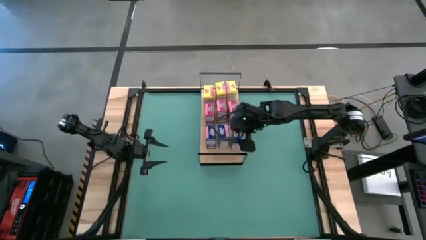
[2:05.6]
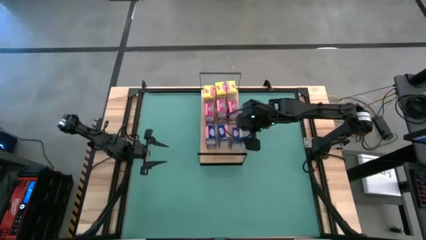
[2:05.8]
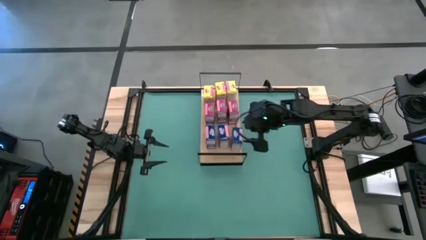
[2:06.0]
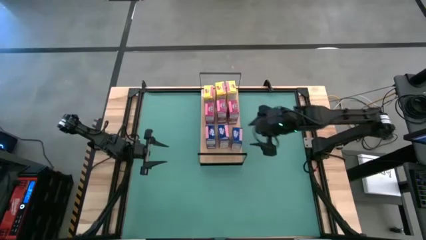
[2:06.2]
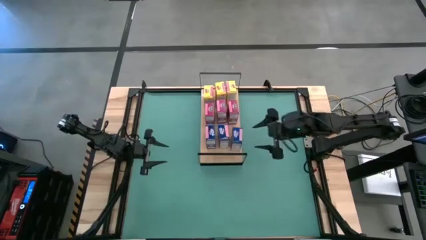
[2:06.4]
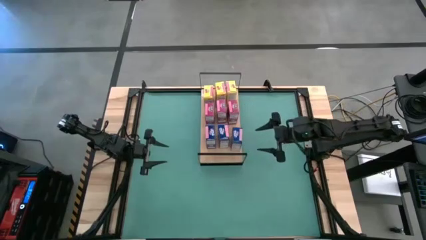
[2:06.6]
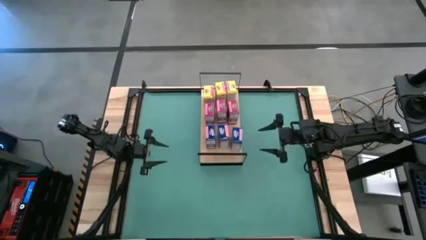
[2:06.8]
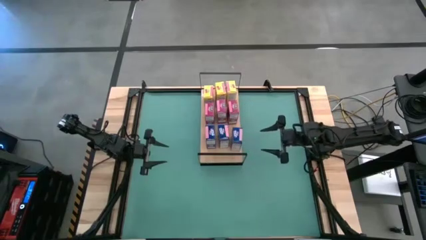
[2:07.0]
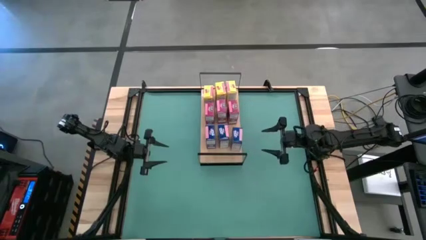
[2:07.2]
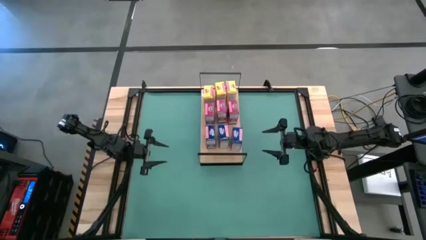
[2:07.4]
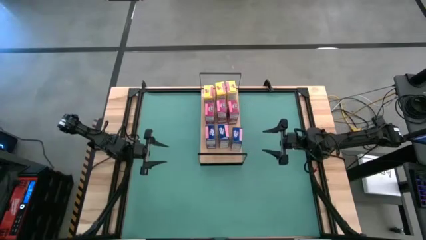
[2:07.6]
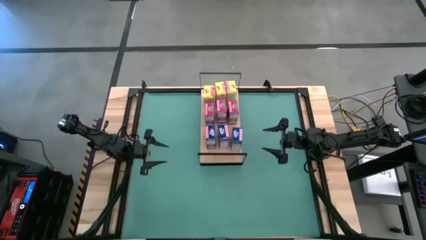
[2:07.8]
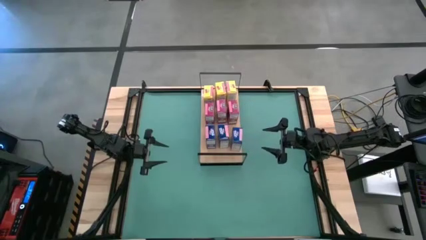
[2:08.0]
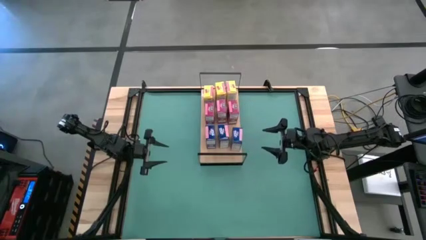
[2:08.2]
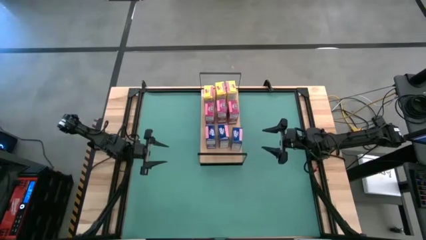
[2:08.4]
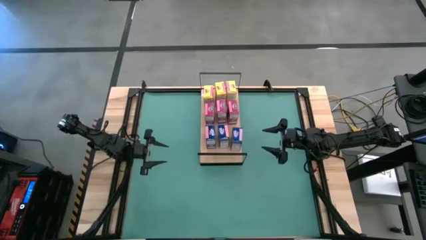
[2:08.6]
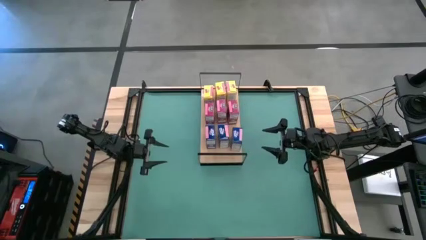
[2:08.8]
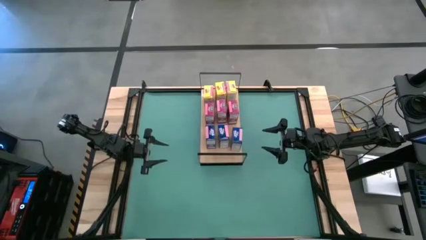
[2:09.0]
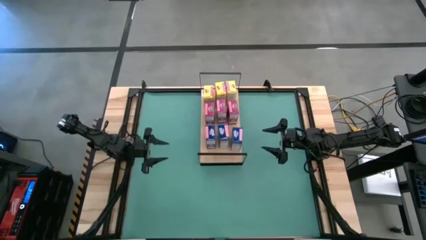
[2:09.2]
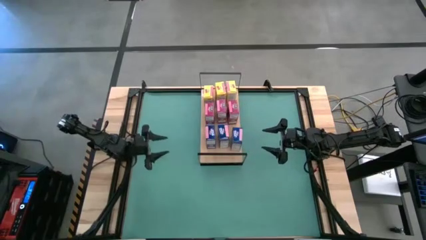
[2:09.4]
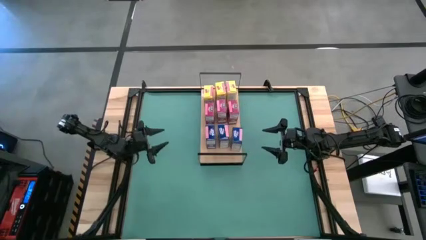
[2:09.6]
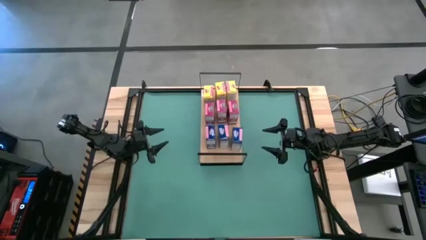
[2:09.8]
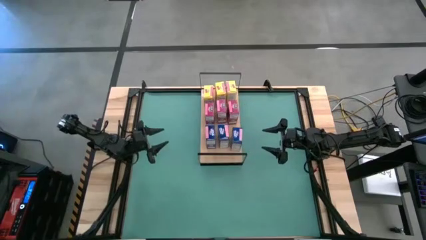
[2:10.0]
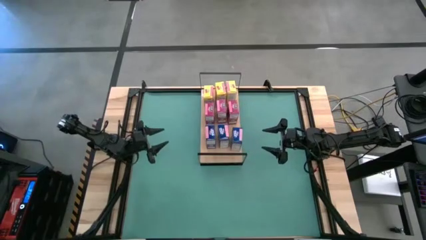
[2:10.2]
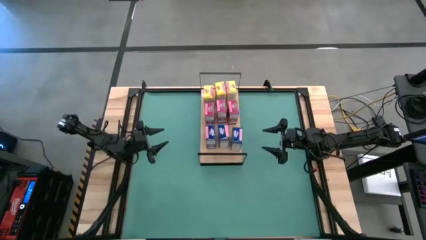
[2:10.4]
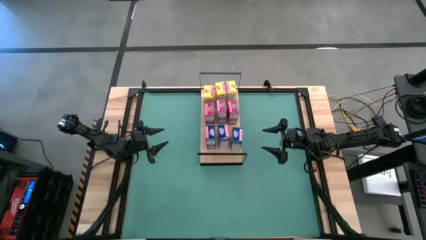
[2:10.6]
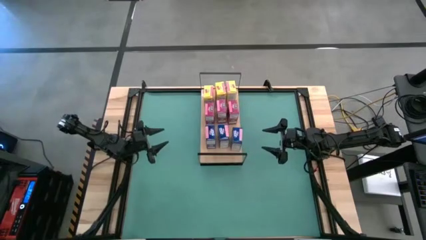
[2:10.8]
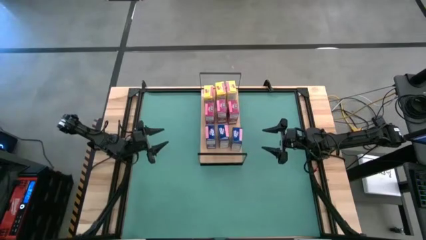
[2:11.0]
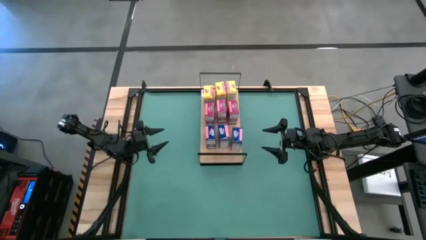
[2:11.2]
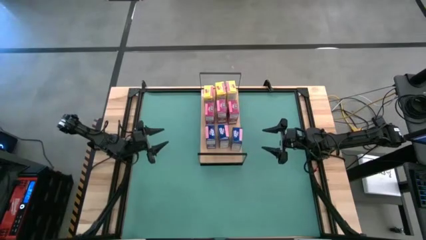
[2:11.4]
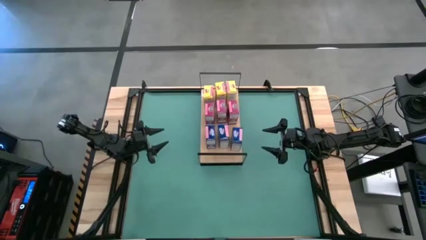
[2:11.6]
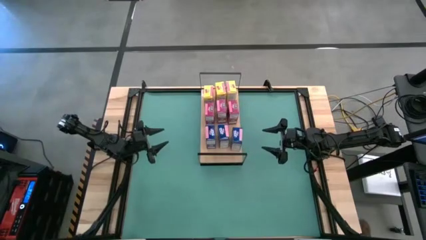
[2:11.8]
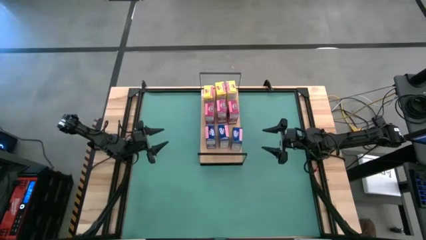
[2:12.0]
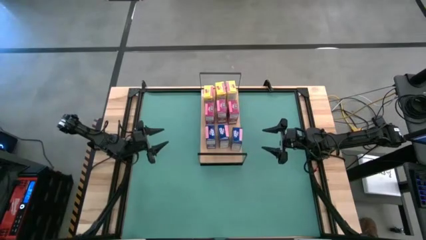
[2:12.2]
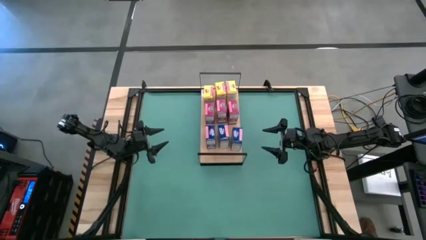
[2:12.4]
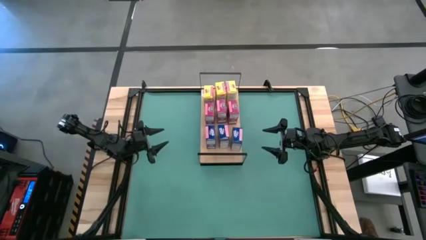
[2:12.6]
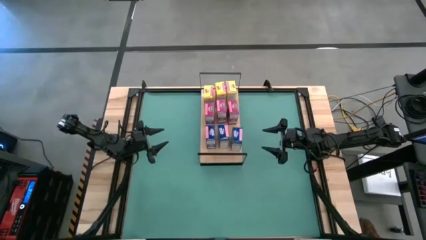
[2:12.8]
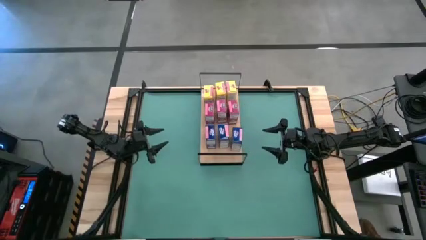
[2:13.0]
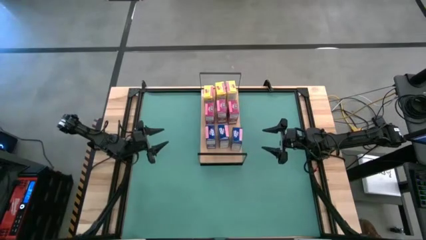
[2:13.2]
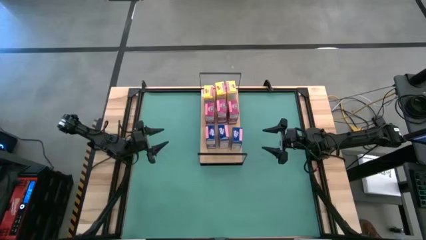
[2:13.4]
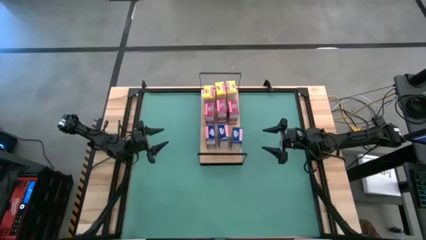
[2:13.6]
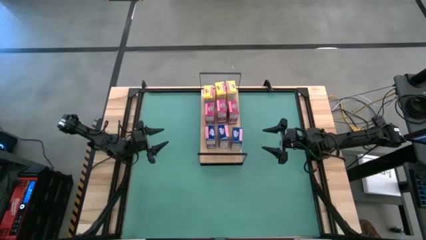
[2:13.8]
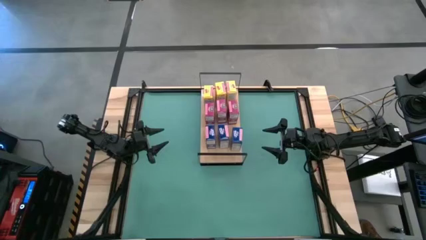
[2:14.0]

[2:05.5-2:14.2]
Task: Stack cereal on shelf
Return to Home Position

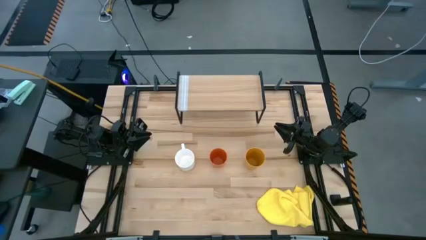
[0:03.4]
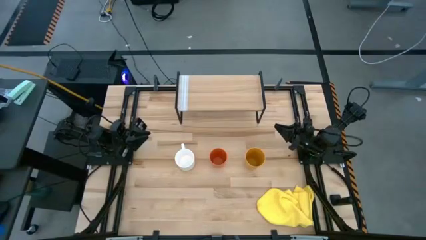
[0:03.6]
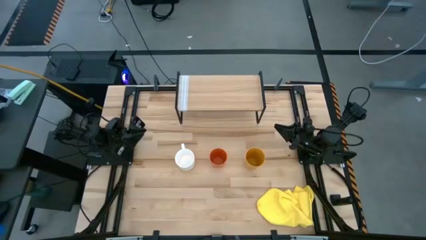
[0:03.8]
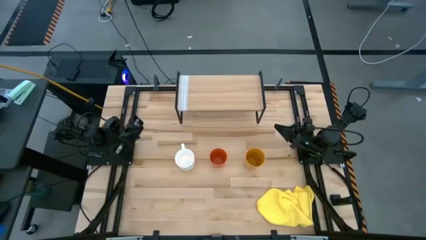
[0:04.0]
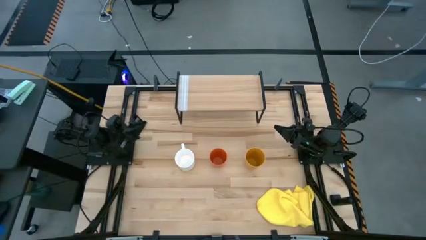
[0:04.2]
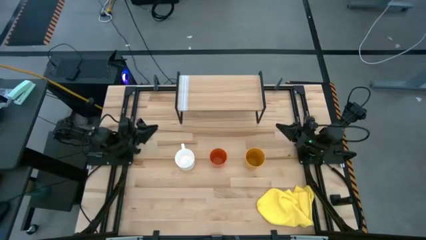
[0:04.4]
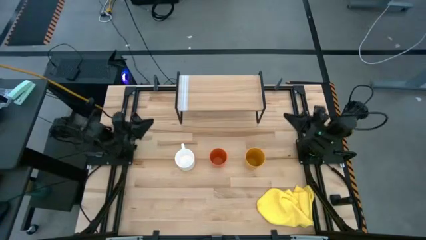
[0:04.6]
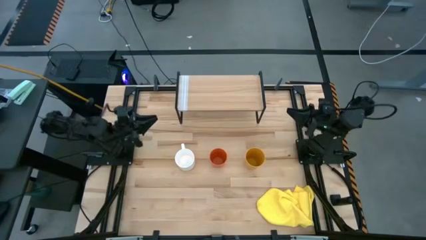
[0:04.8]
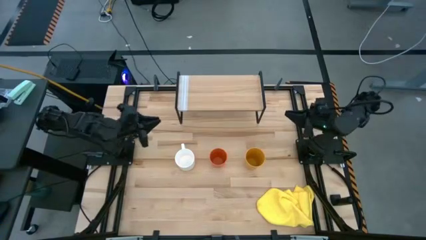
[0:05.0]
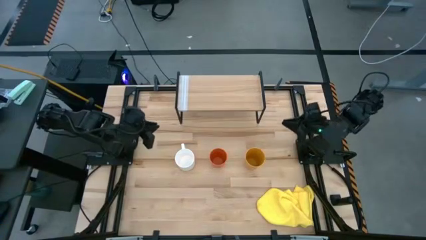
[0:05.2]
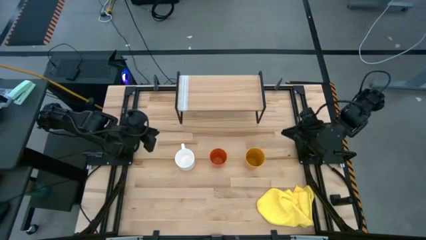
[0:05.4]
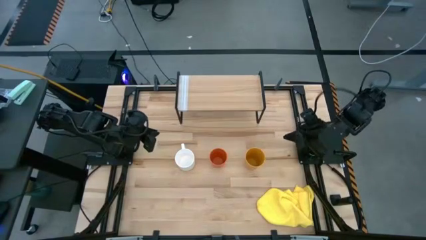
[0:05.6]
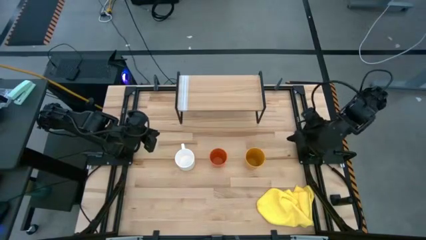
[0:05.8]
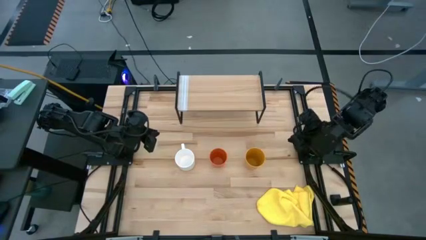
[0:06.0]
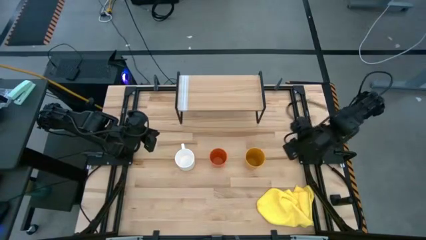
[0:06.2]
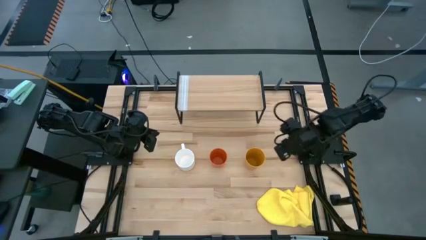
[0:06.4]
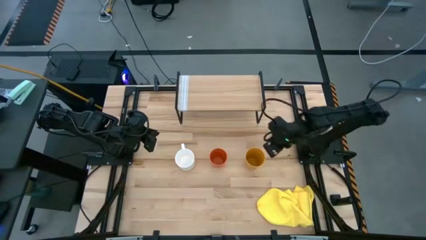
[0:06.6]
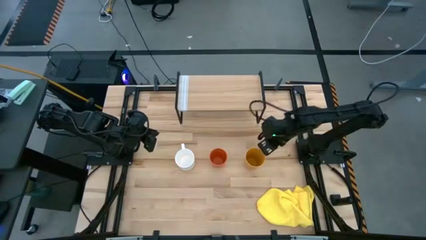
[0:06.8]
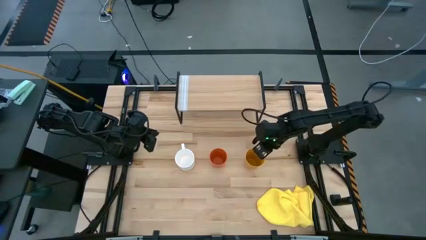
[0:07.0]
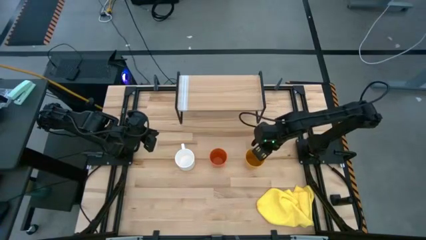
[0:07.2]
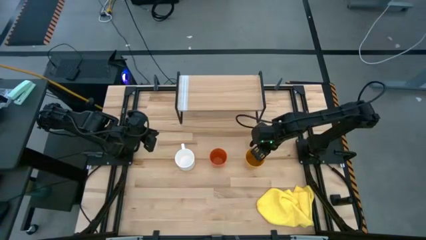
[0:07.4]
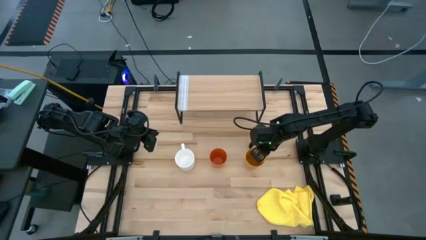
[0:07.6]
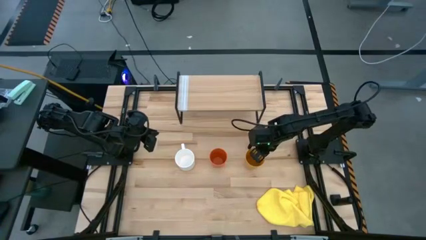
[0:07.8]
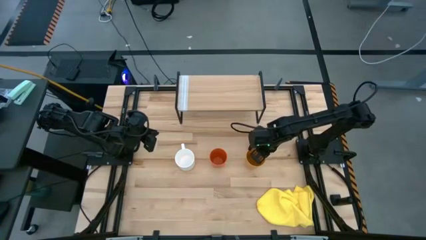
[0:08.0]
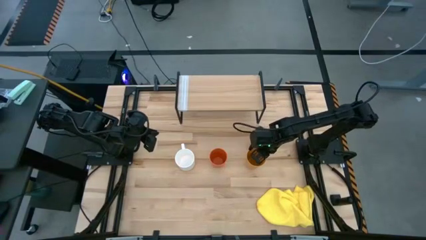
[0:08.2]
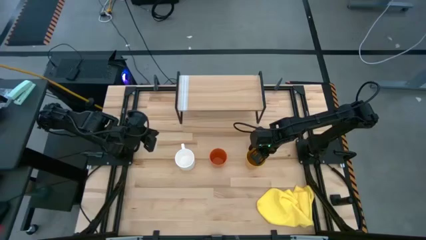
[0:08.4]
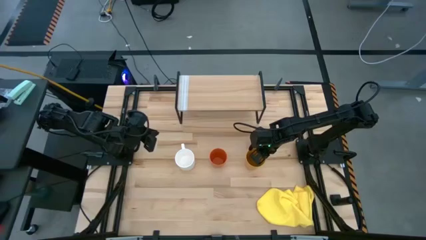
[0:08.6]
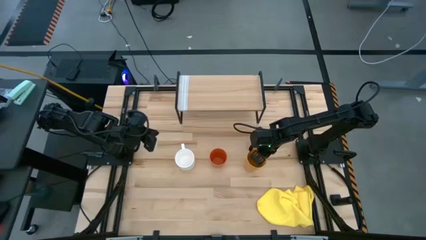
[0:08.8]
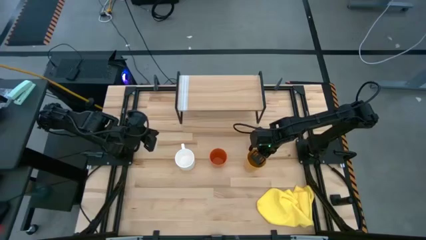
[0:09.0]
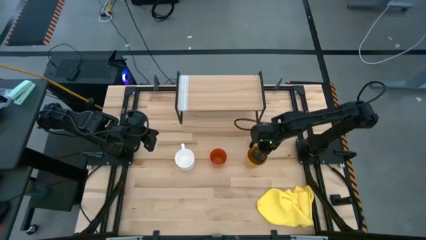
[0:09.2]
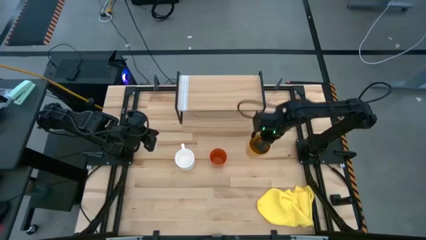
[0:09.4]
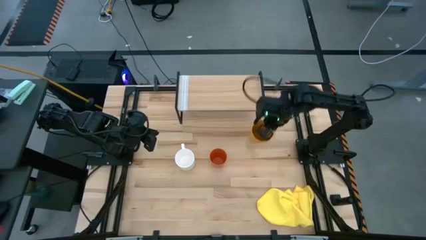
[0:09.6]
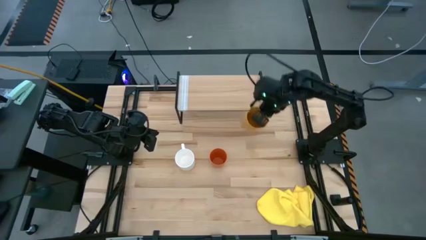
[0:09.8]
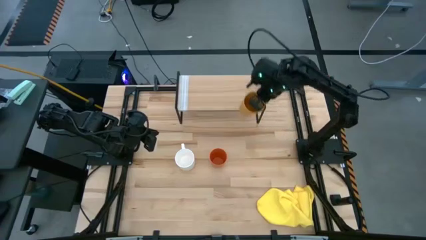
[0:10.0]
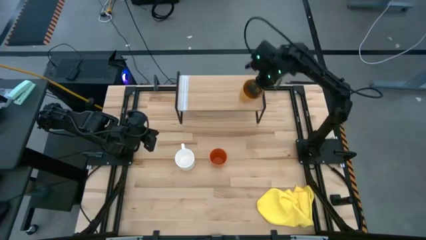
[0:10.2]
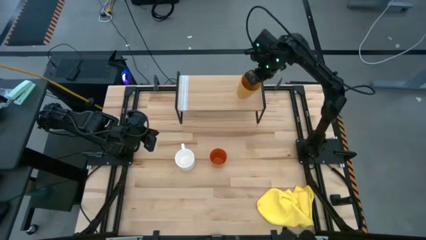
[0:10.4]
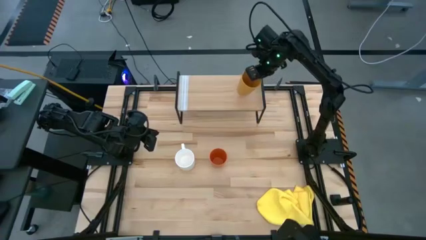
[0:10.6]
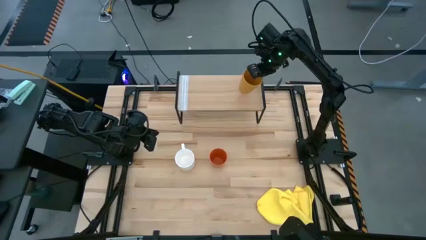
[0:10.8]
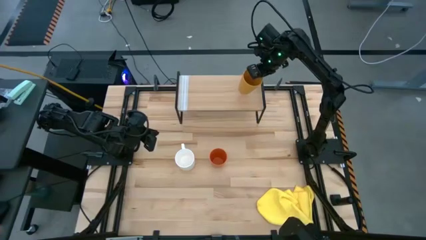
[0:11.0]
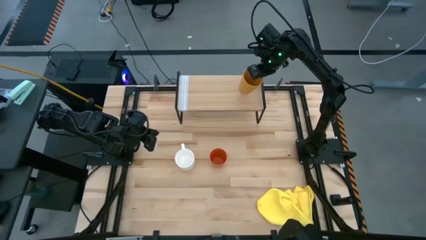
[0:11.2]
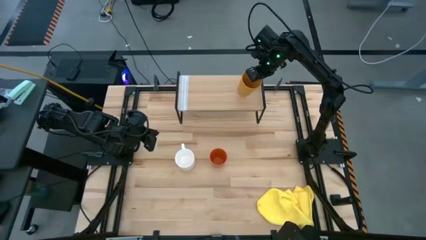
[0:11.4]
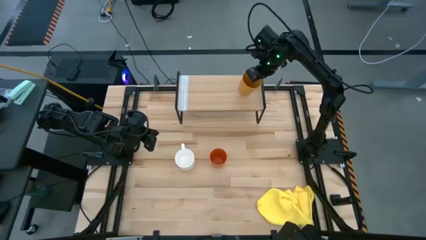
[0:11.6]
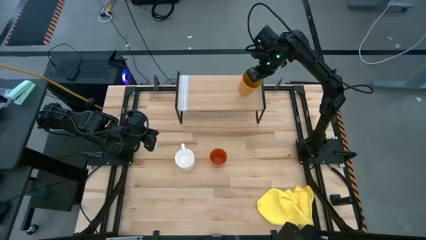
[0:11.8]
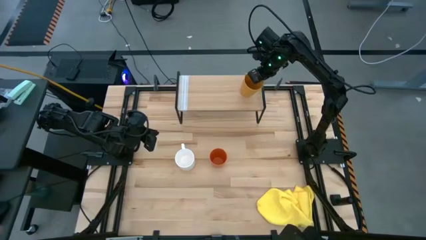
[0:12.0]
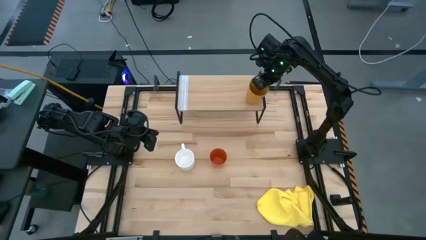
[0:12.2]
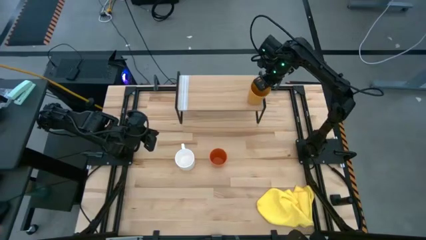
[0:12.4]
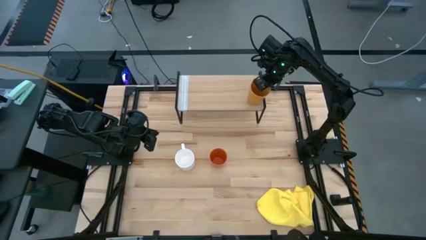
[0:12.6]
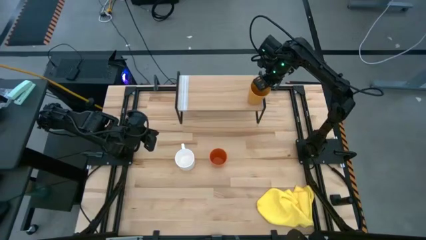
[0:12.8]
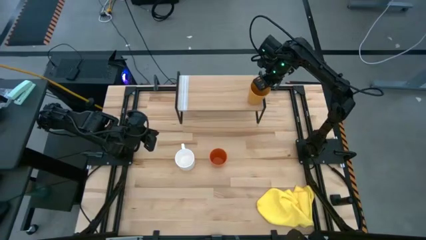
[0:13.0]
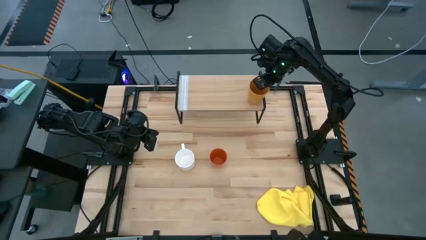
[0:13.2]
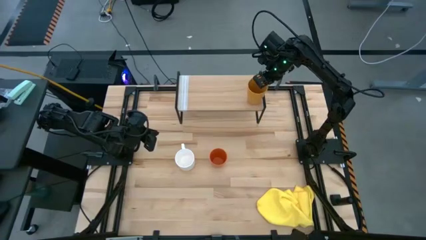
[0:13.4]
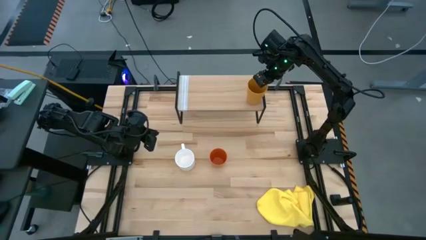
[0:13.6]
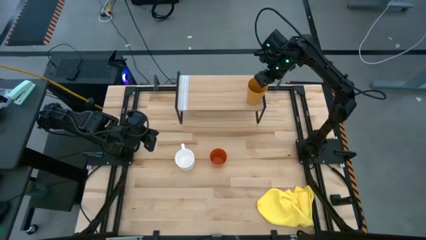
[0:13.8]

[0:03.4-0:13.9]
Task: Stack small to large cups/mugs on shelf
Put the yellow cup on the shelf
